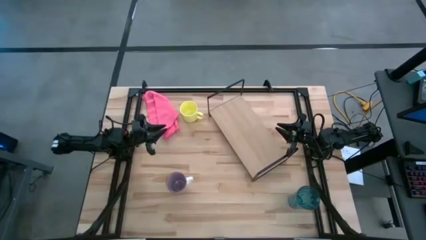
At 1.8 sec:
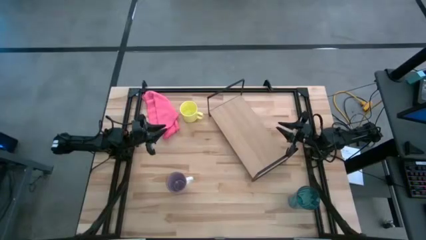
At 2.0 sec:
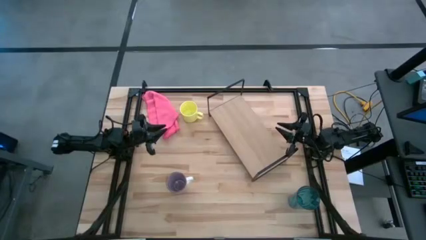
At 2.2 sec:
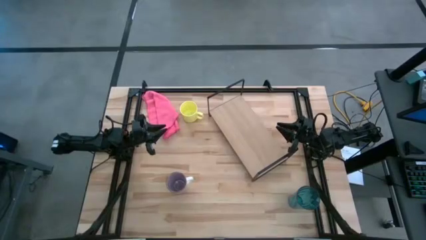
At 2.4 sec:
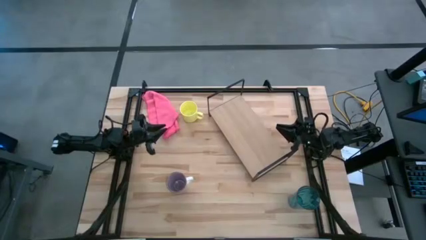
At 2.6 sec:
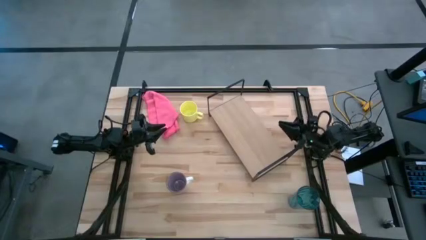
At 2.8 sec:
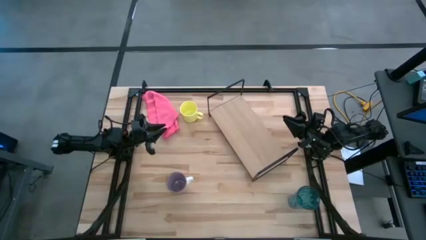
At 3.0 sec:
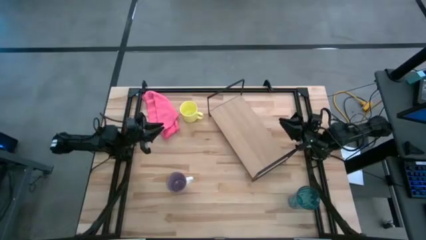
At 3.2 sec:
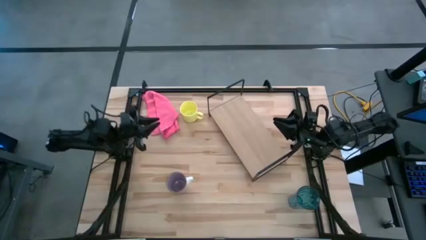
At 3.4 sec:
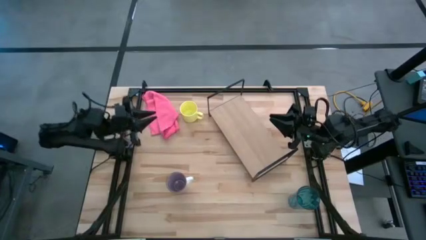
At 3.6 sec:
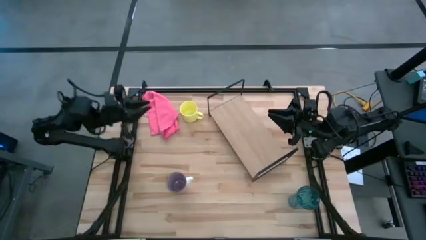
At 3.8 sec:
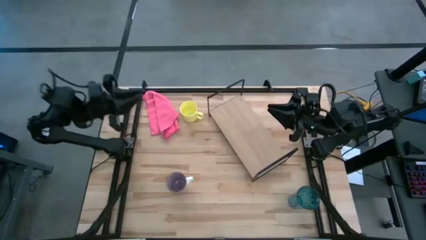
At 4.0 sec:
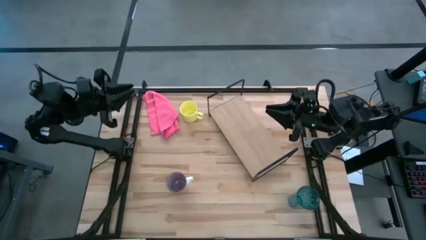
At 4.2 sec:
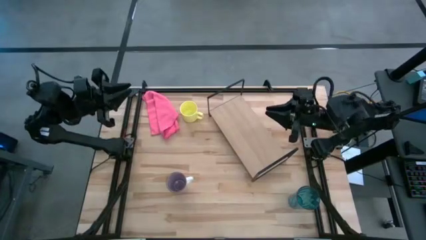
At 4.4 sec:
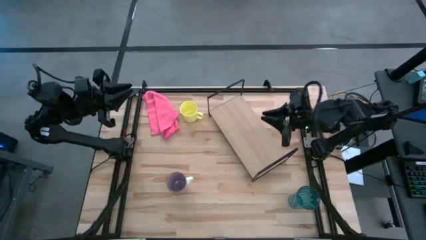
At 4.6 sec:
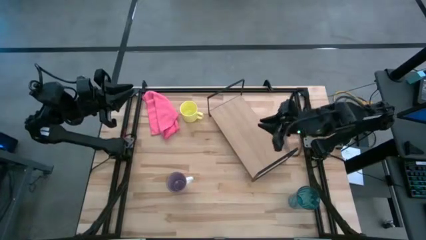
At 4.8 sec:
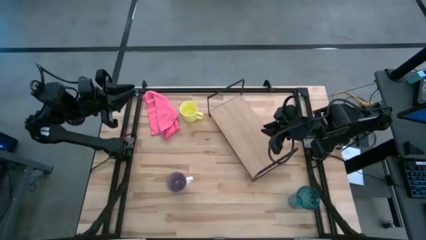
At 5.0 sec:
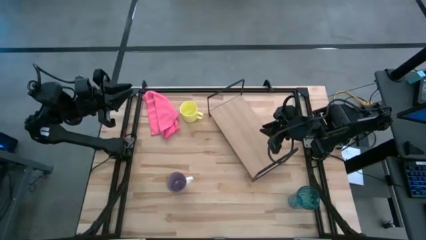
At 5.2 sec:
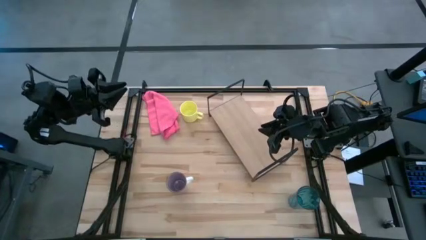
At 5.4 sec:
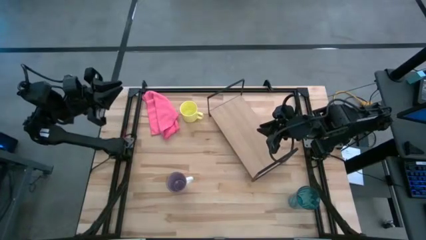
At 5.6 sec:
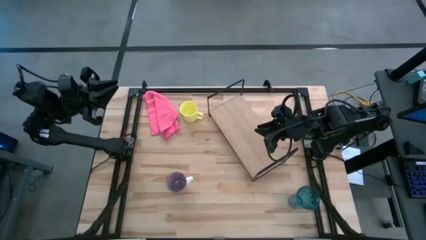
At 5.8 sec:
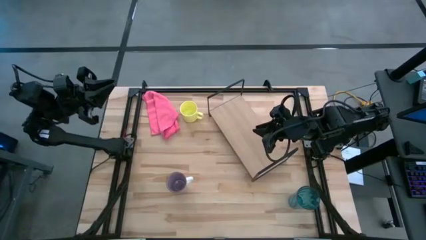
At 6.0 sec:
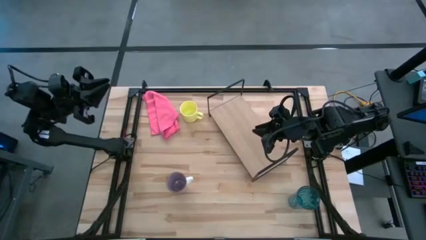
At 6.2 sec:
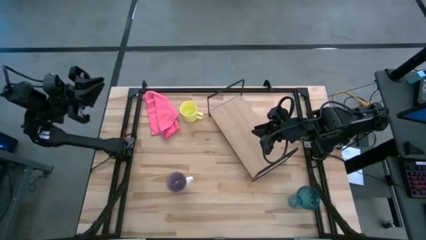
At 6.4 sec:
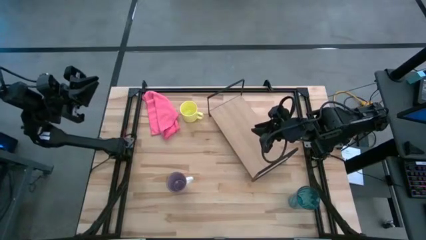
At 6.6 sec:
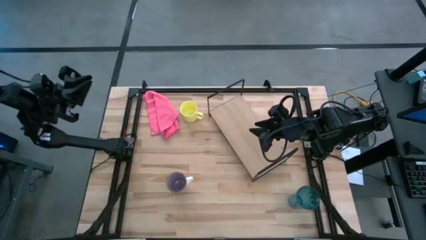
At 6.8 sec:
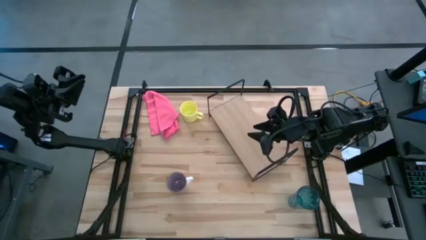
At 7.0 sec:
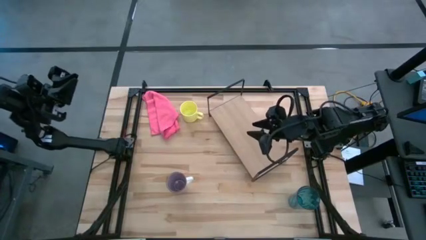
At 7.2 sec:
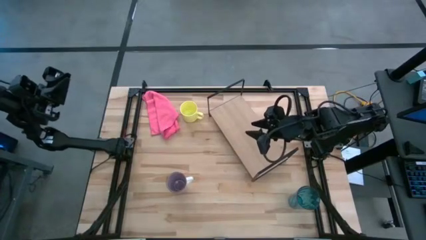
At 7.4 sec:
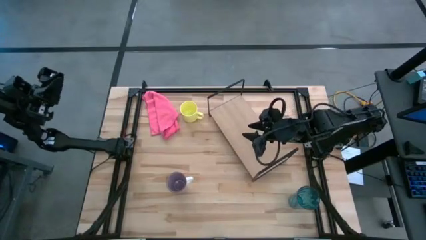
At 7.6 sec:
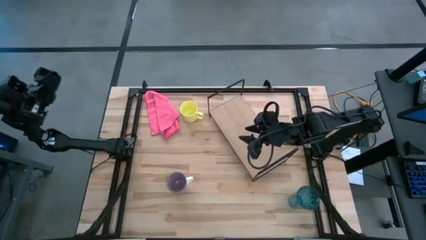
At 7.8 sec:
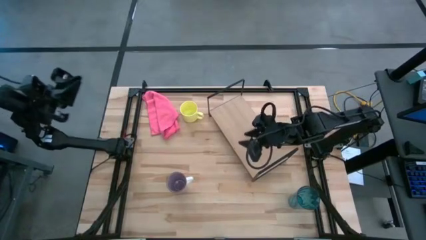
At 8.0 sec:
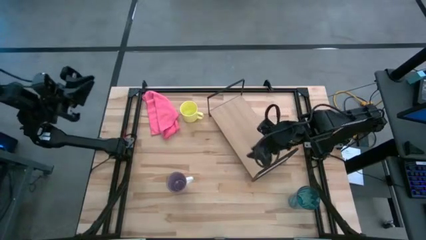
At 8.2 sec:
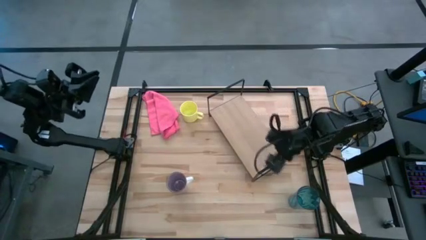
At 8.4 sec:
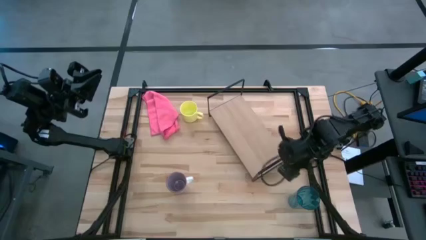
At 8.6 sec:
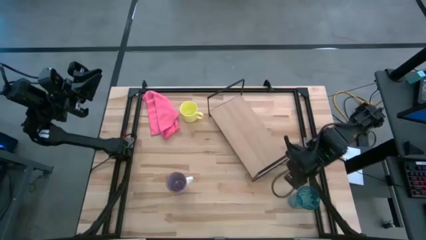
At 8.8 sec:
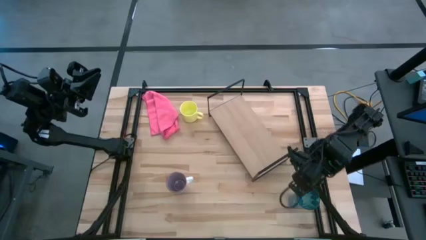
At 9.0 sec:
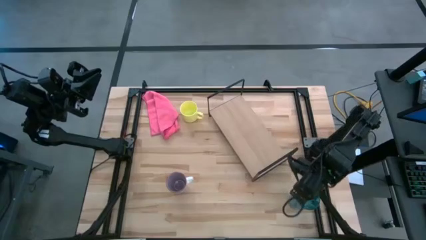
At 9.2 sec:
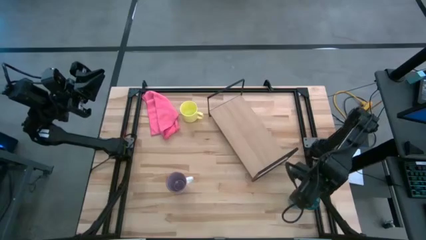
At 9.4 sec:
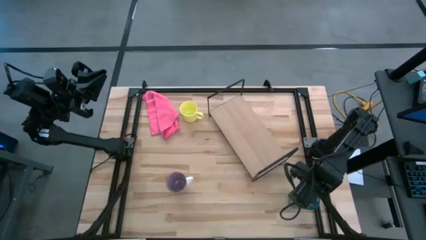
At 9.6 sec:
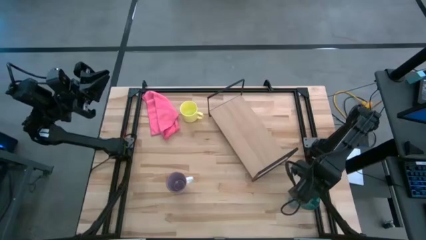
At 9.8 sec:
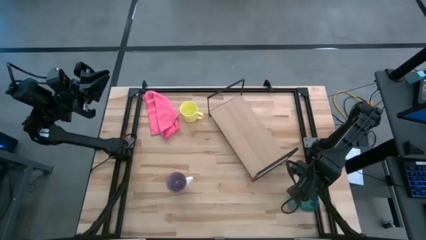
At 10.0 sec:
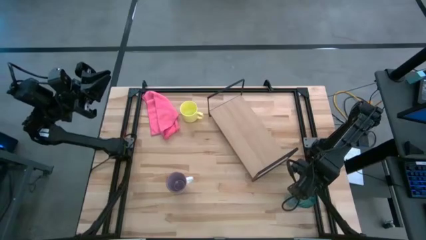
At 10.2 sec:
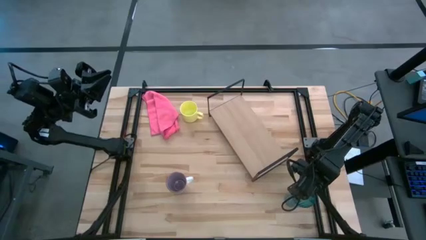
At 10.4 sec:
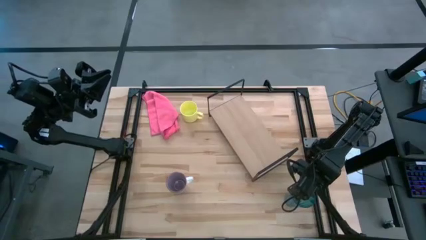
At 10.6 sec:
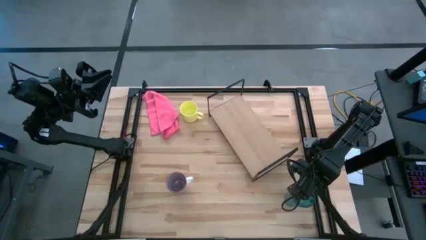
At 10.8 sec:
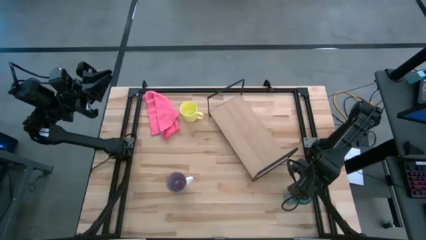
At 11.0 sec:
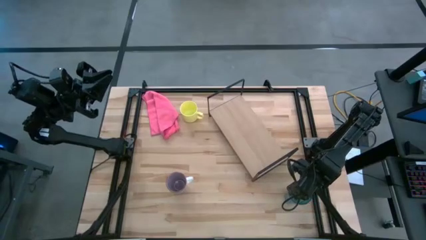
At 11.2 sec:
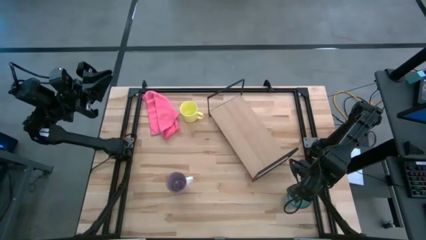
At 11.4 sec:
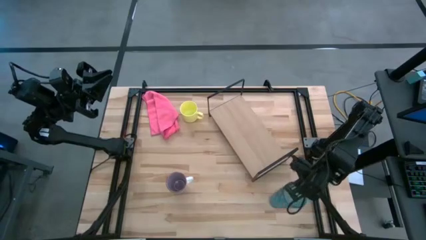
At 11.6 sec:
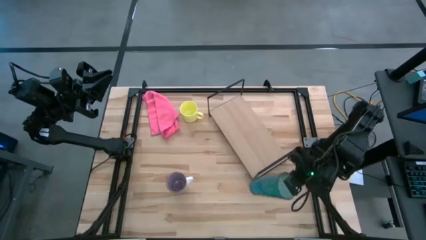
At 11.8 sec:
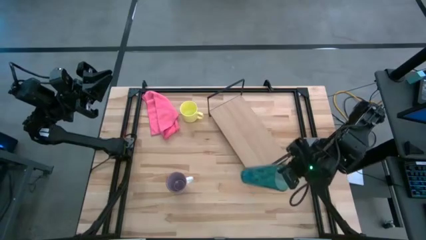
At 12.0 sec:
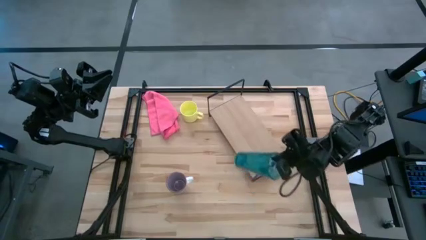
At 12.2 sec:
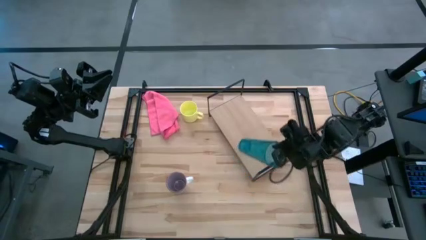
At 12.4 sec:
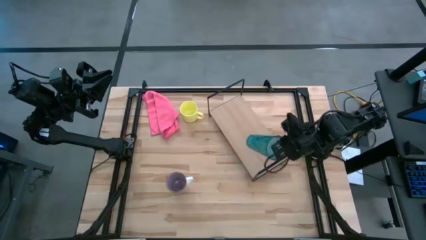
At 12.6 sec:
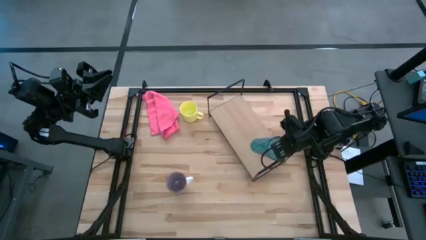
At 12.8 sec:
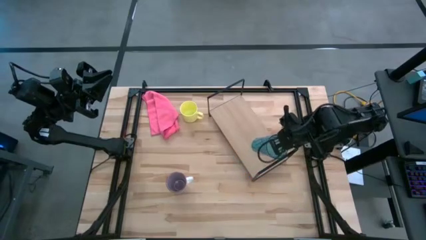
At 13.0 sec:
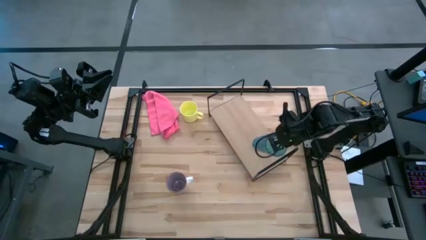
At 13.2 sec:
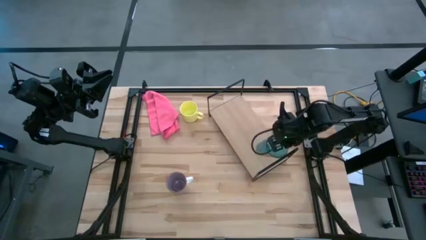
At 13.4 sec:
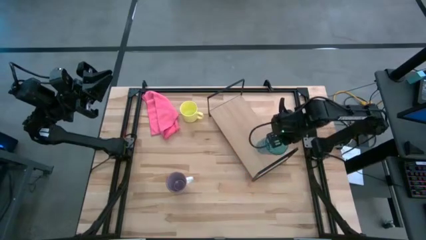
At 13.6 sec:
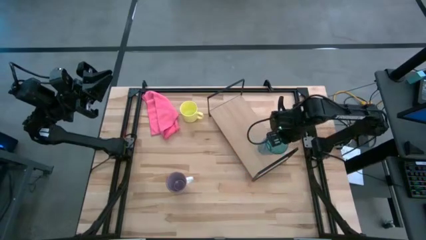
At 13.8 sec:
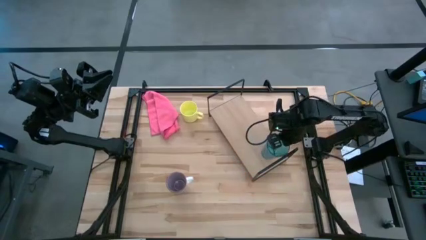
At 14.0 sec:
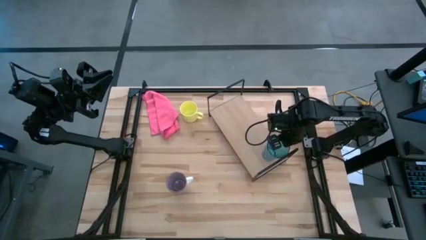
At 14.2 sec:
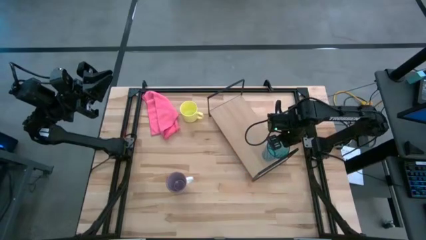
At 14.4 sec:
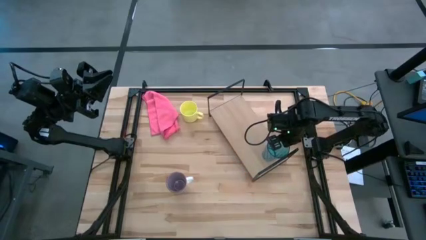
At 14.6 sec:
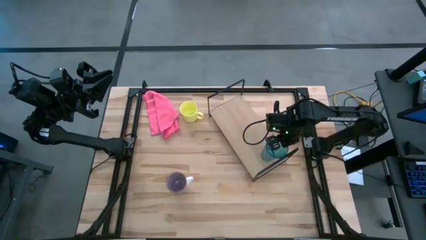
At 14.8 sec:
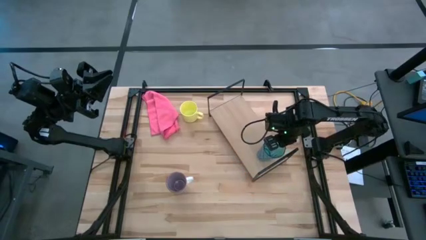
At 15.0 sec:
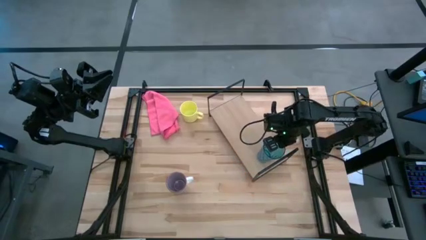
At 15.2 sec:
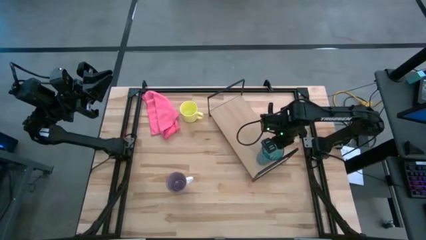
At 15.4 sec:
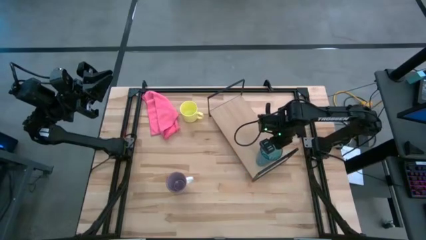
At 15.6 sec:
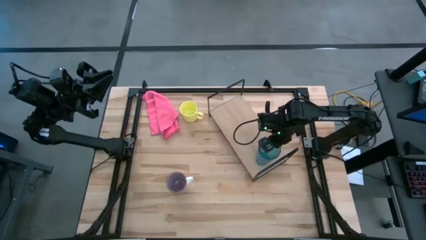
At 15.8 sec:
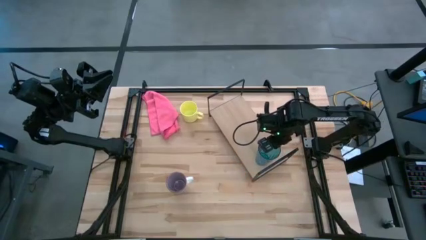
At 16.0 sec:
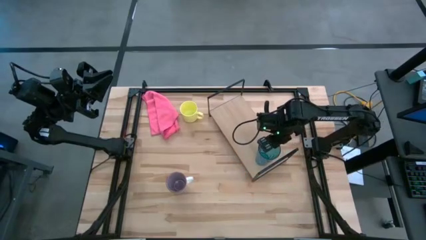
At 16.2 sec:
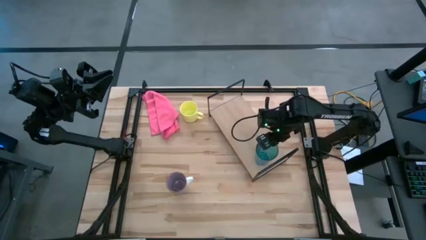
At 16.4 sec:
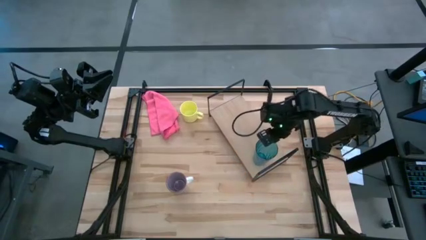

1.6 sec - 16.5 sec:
Task: Stack small to large cups/mugs on shelf
Put the blue cup on the shelf
